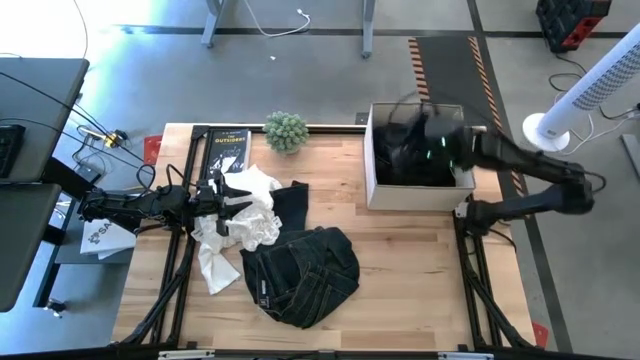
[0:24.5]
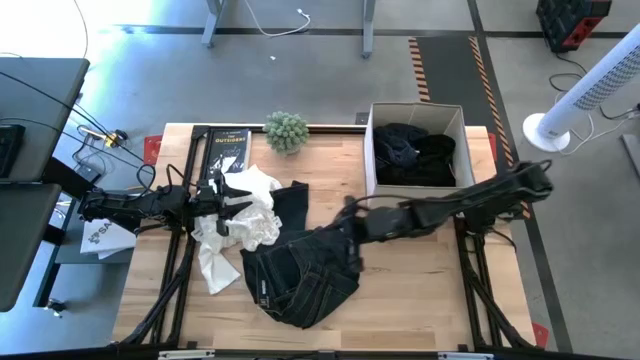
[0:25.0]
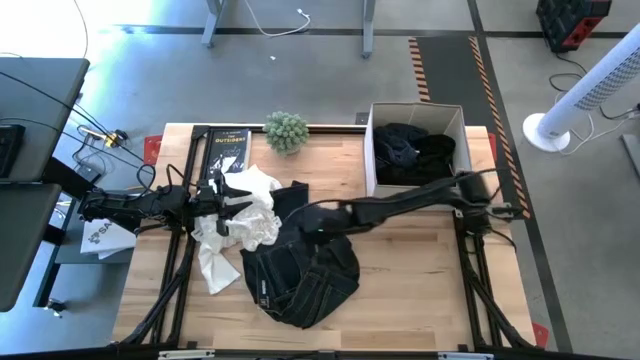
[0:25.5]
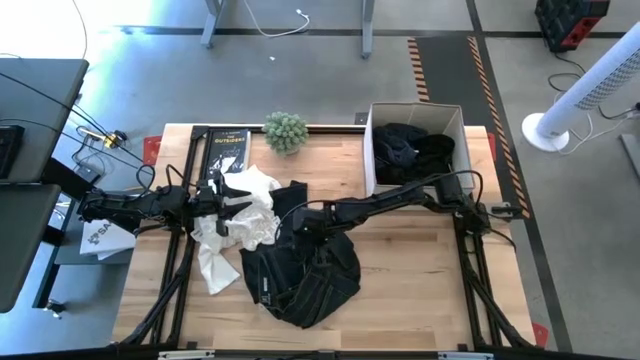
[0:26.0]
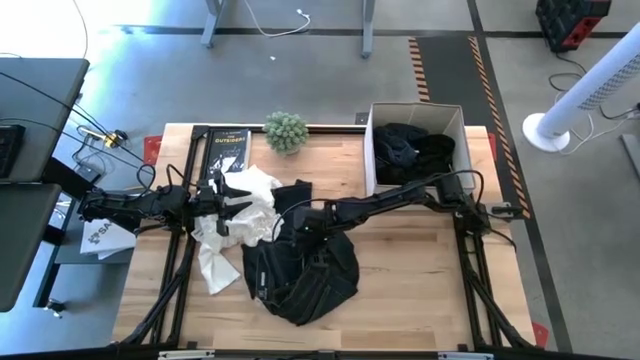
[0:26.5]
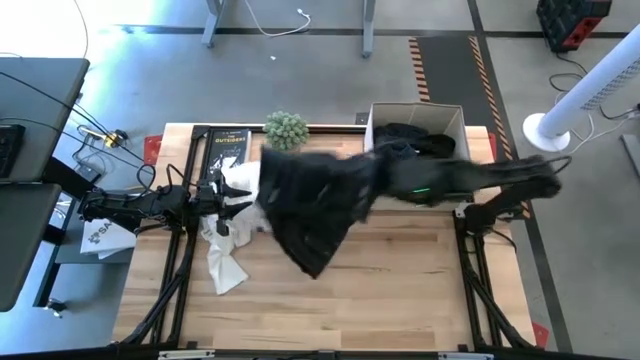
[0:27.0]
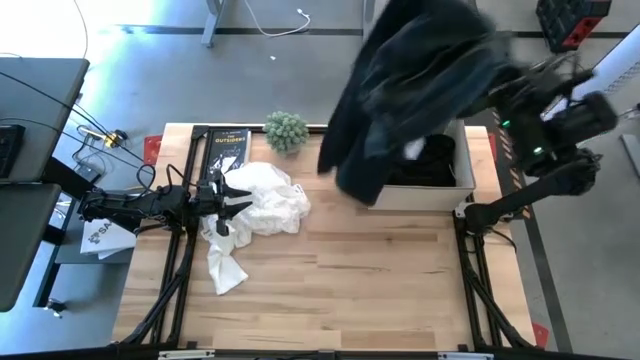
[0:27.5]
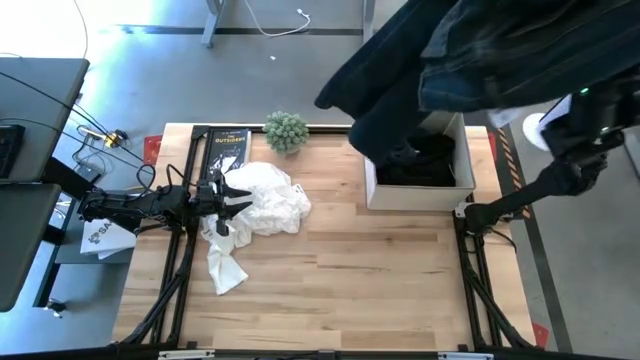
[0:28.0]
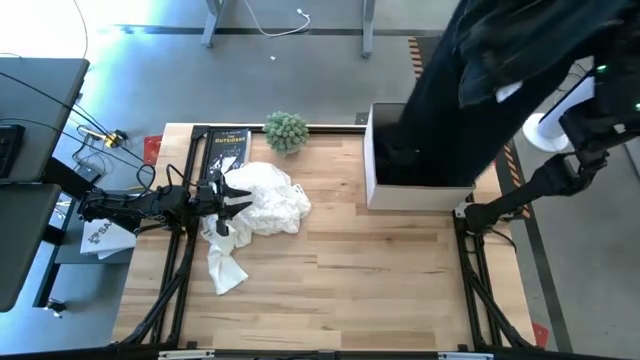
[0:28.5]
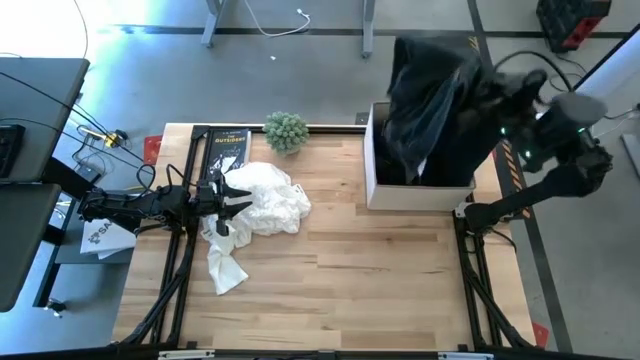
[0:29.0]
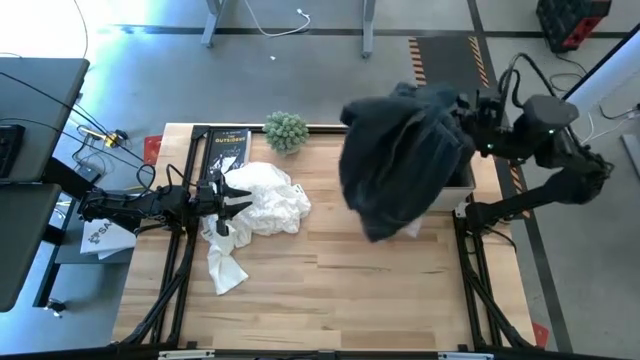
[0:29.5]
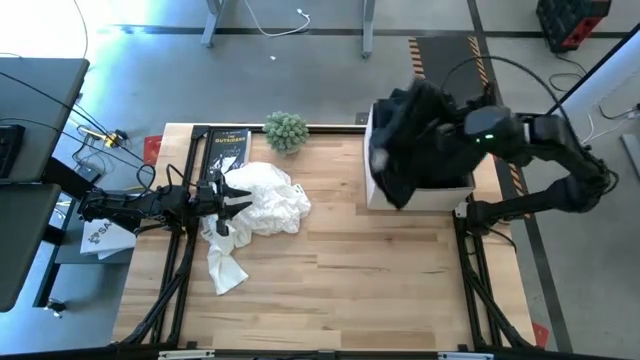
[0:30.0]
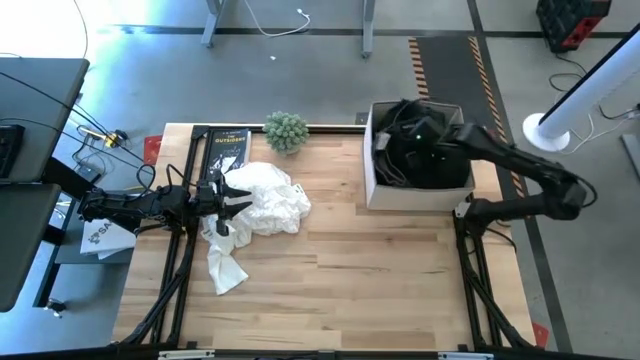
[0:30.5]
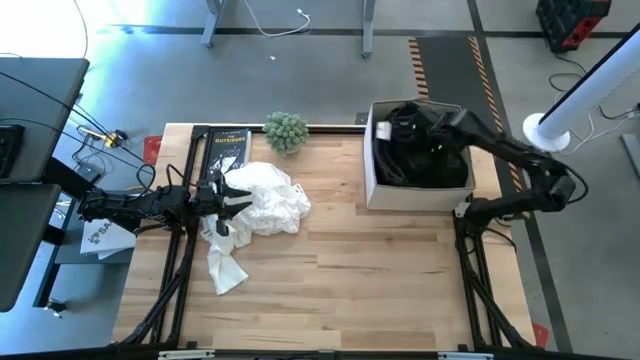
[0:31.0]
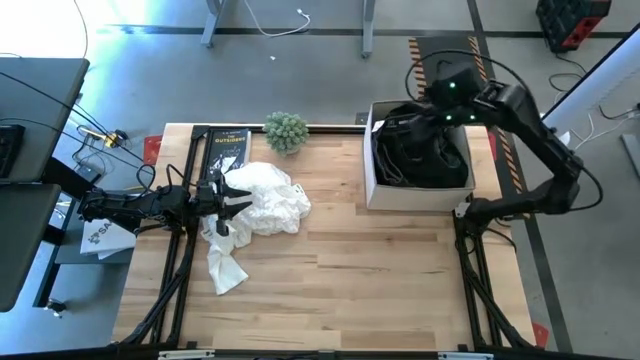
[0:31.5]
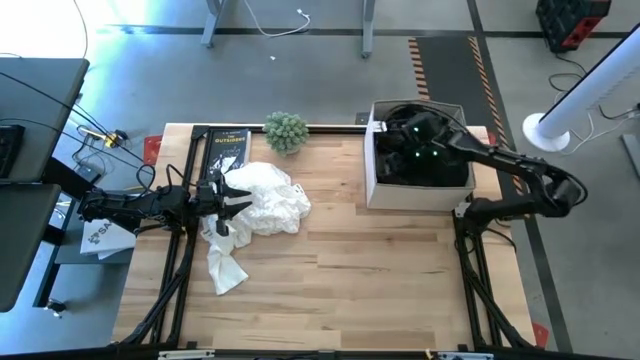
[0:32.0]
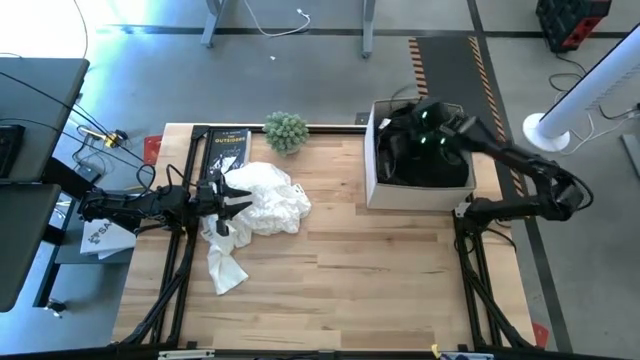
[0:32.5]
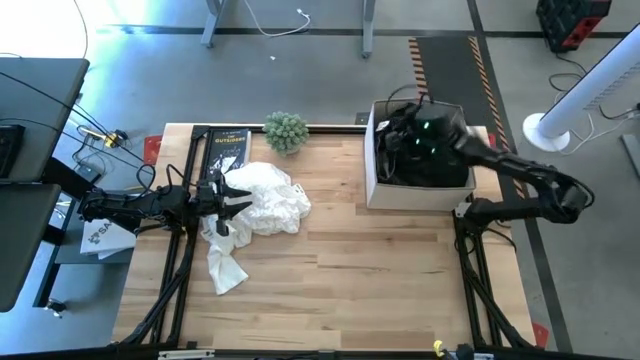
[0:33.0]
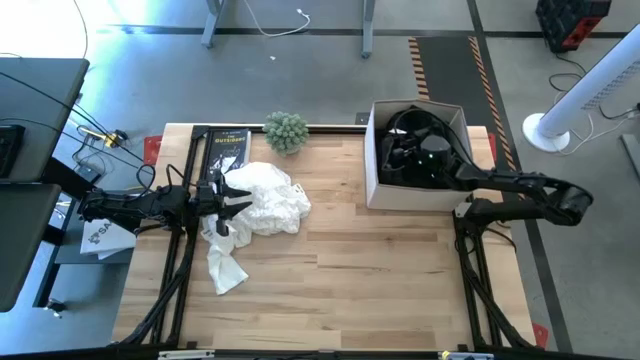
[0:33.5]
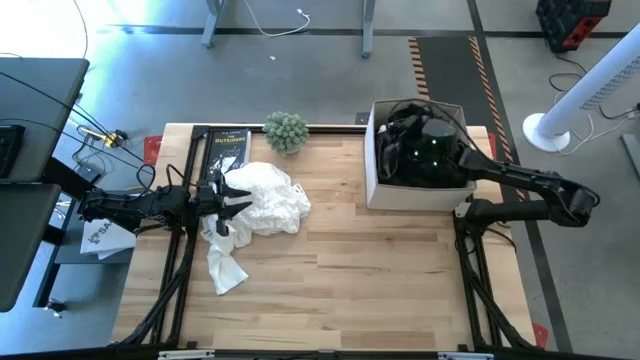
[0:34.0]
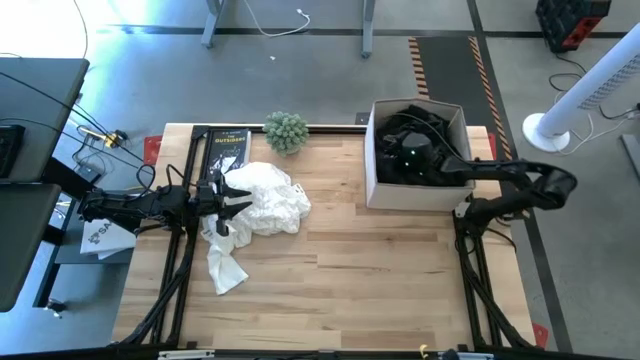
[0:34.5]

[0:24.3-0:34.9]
Task: Sort clothes
Put the blue pants into the white laundry bin

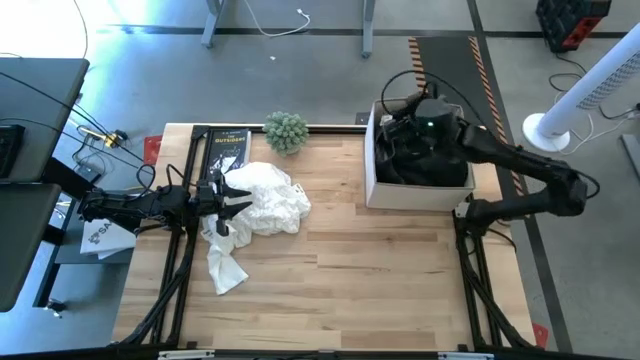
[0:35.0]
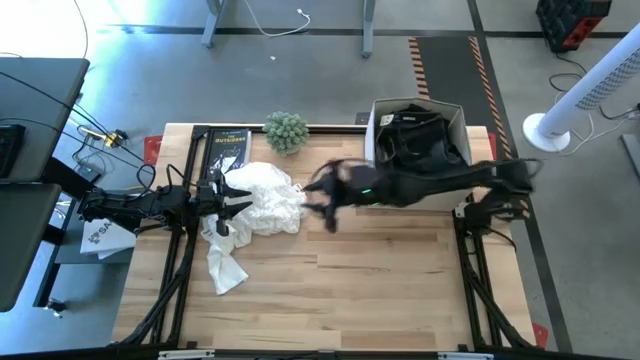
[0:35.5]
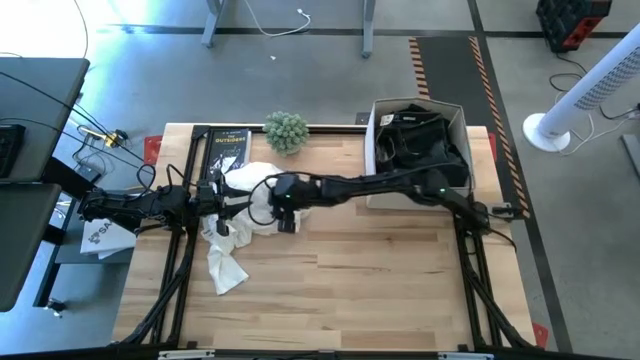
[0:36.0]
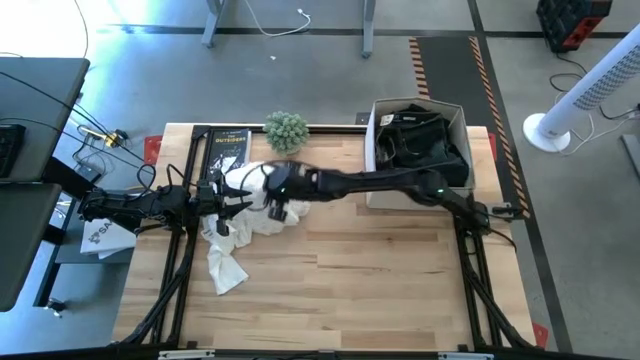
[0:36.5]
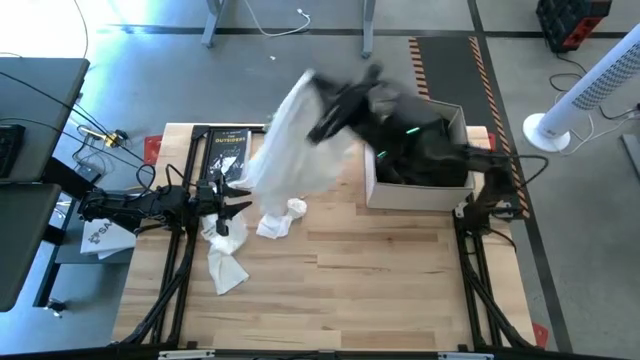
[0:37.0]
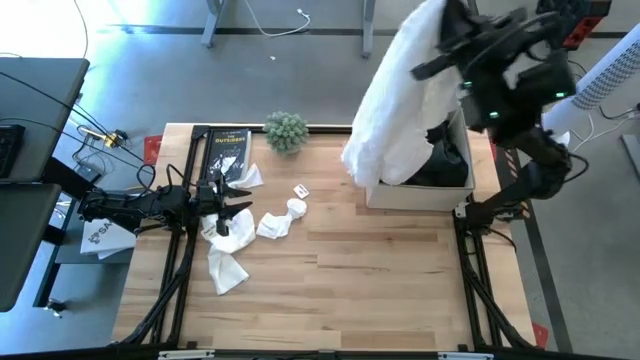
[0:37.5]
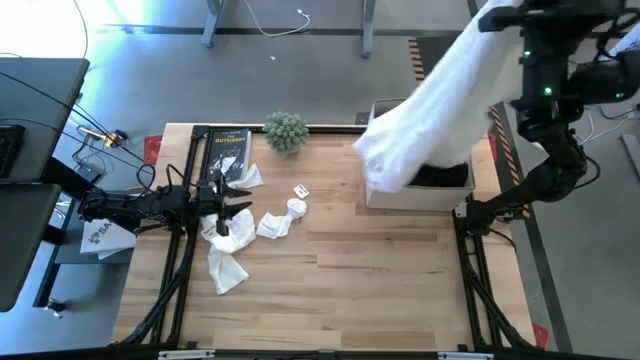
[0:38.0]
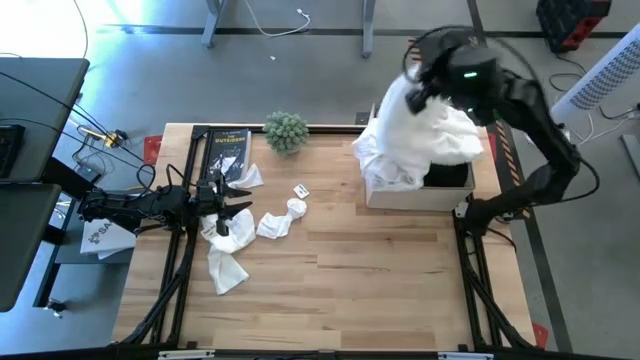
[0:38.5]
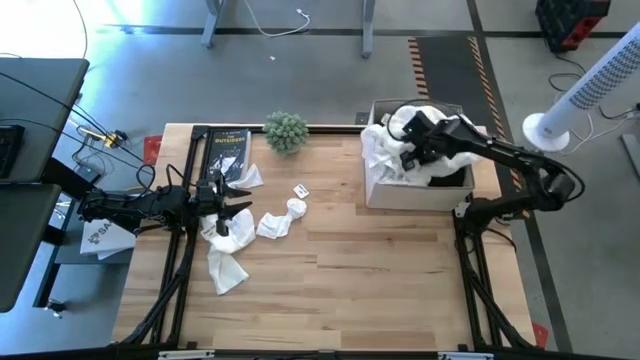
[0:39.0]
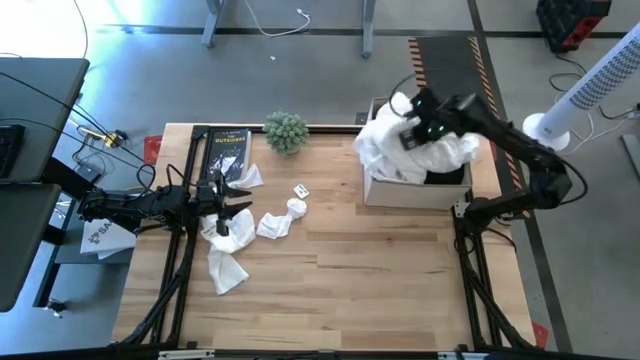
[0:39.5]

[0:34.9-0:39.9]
Put the white shirt into the white laundry bin

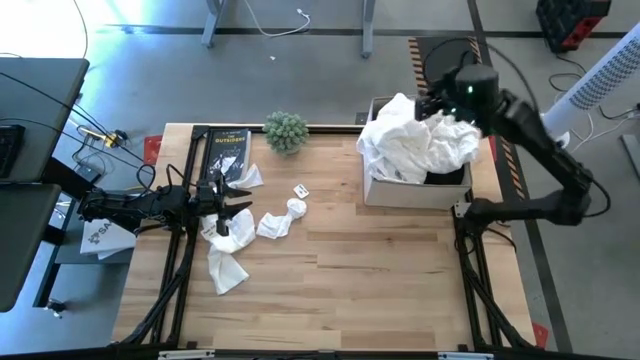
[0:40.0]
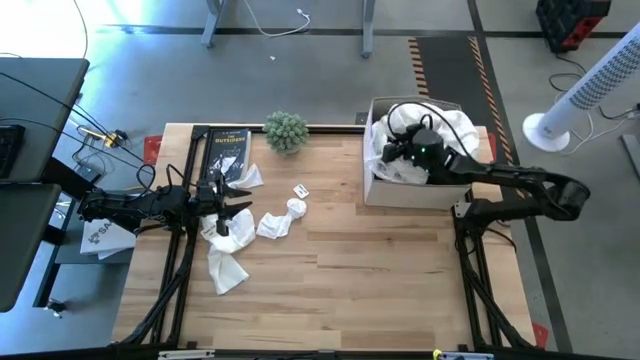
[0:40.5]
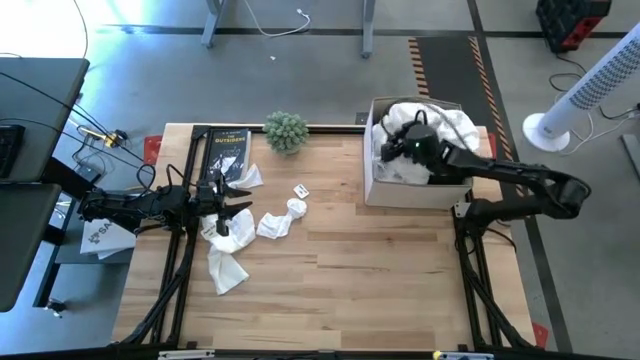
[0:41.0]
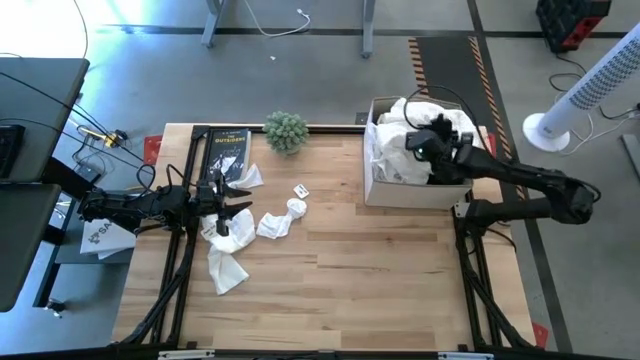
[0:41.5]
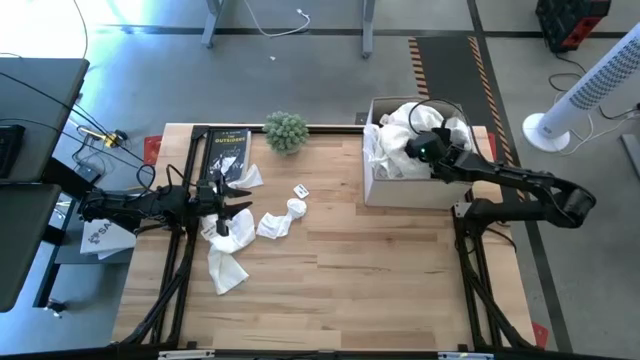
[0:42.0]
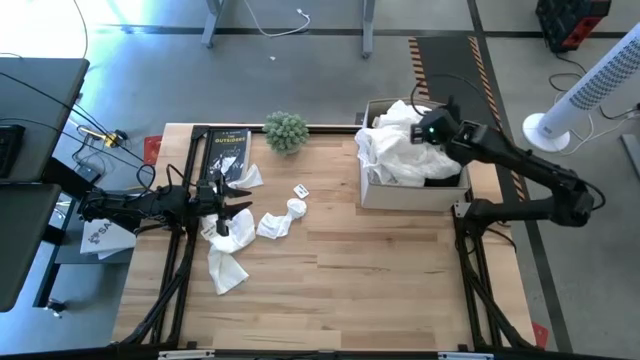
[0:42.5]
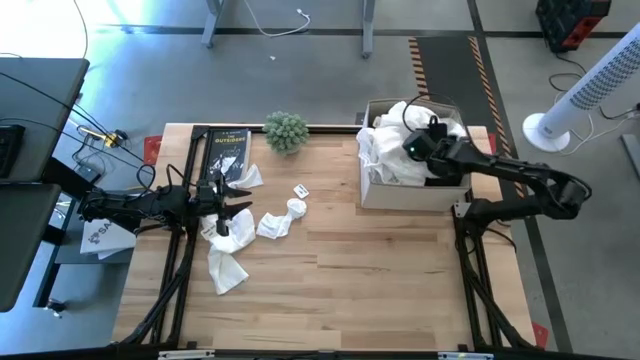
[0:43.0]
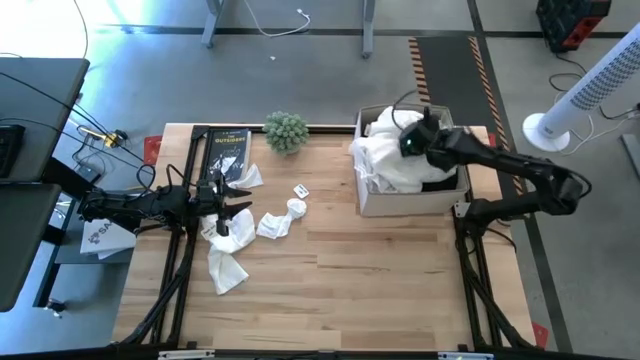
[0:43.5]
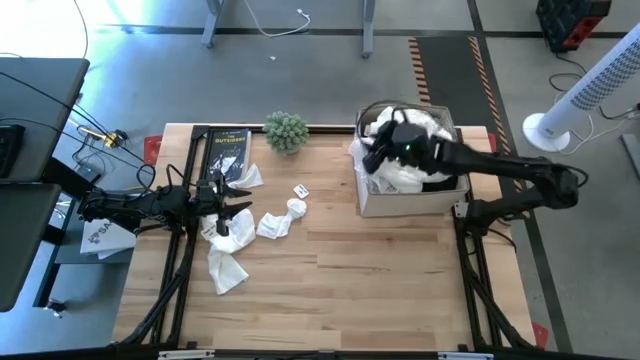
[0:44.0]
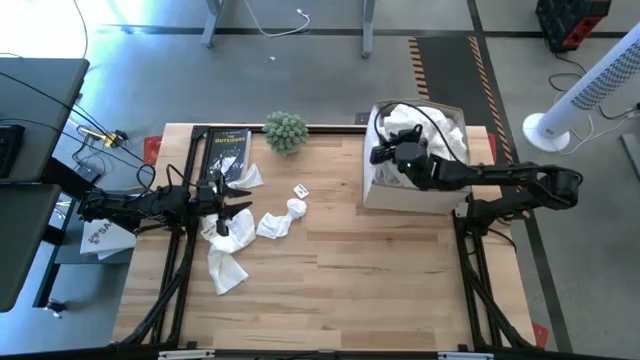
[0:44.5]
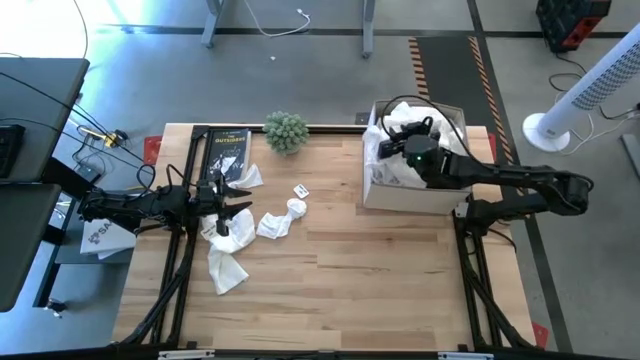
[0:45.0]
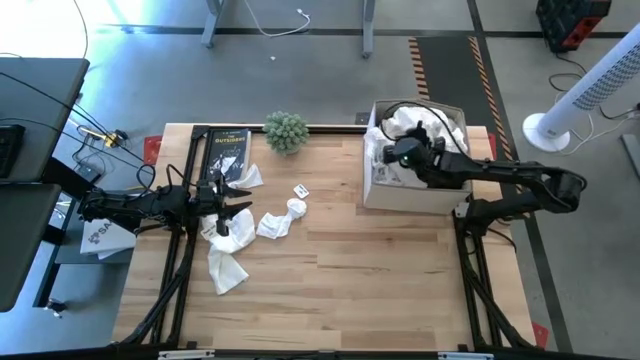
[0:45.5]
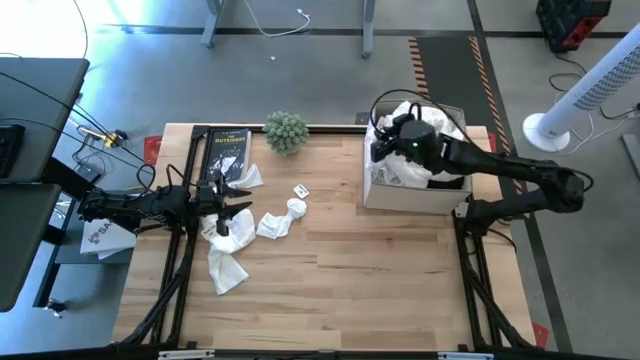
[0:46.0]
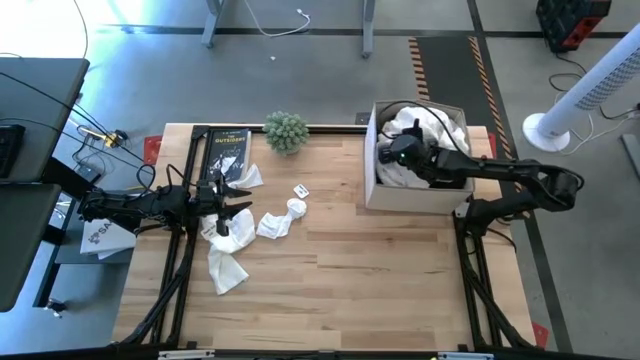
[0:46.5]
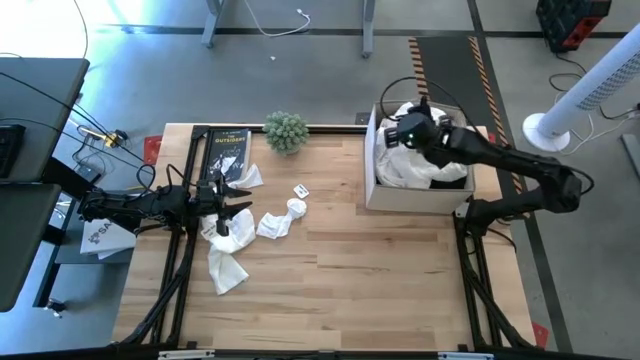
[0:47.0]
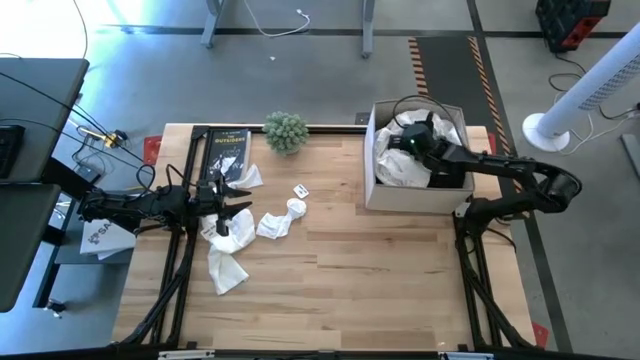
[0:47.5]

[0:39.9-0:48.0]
Adjust the white shirt
